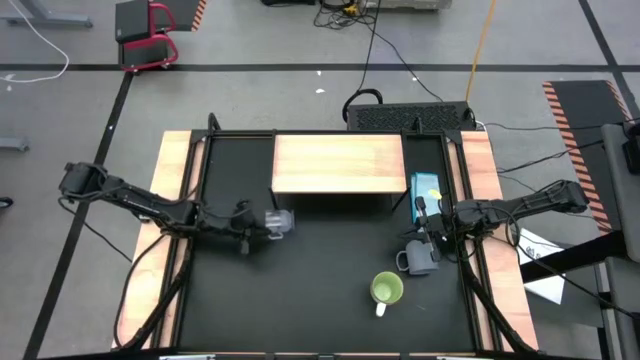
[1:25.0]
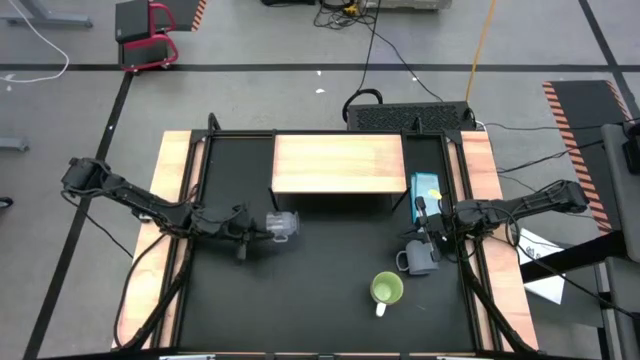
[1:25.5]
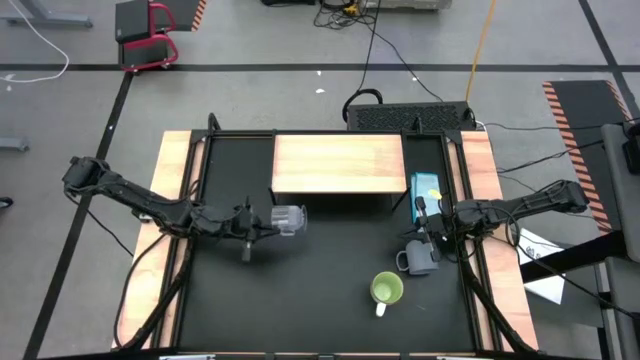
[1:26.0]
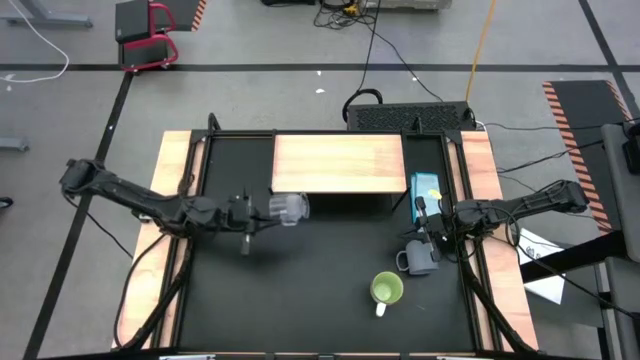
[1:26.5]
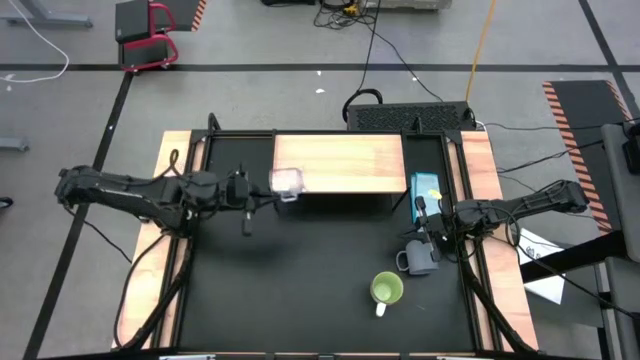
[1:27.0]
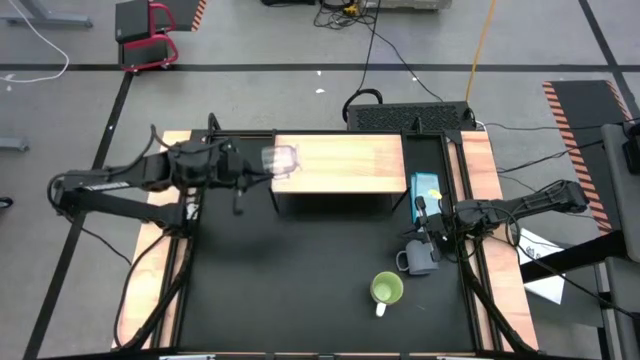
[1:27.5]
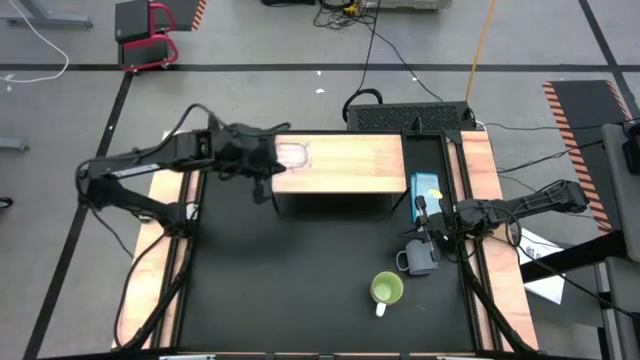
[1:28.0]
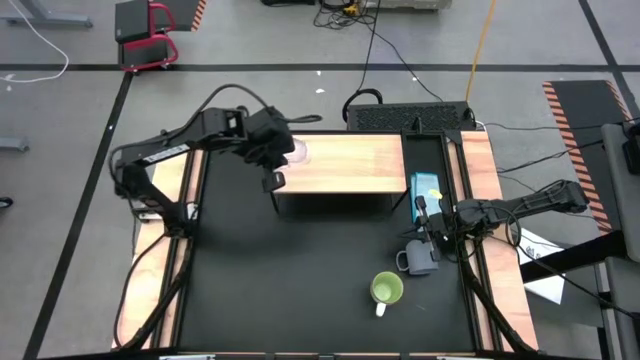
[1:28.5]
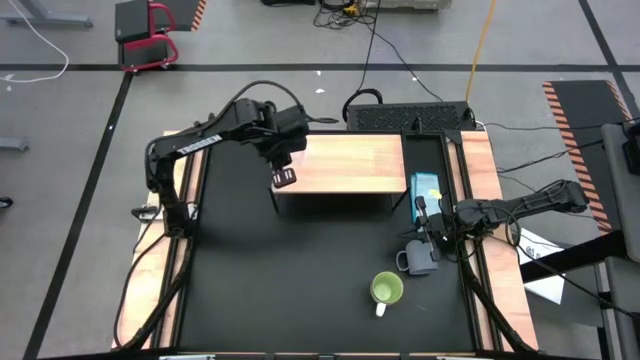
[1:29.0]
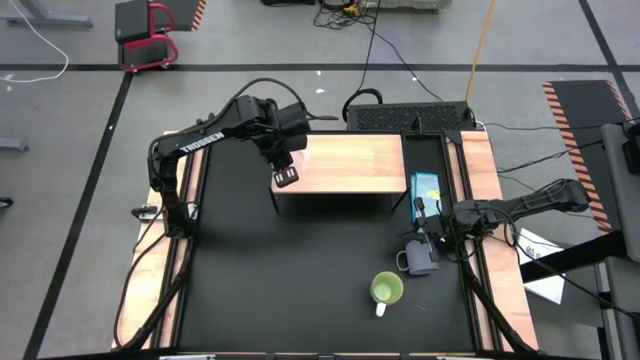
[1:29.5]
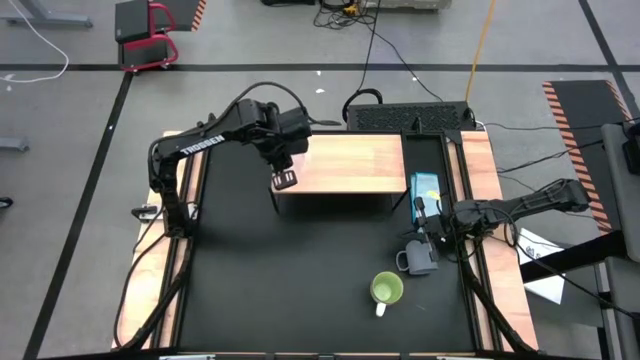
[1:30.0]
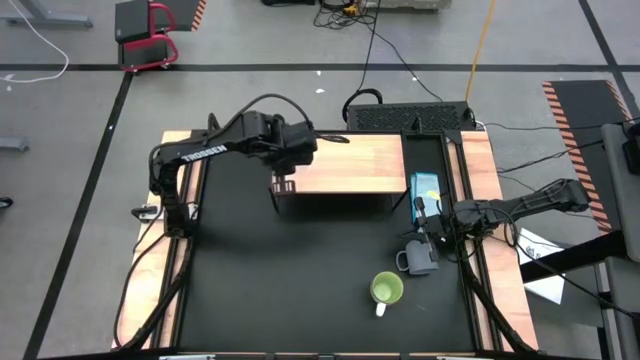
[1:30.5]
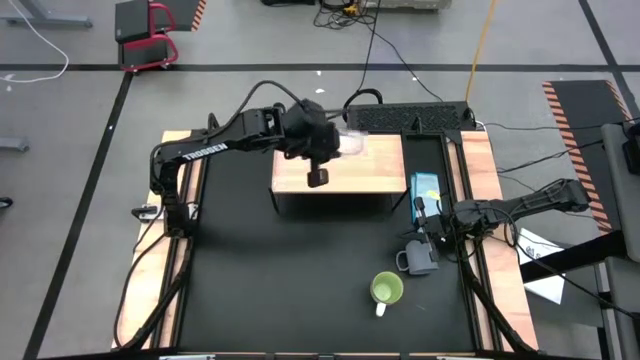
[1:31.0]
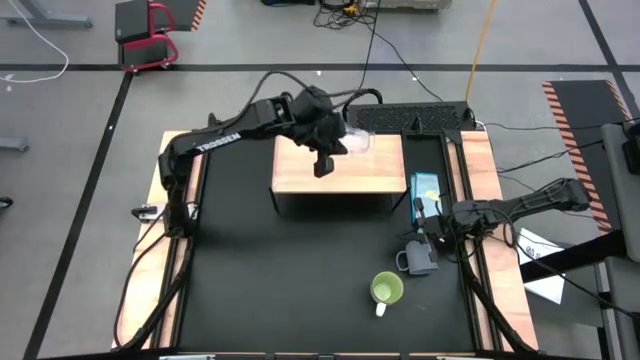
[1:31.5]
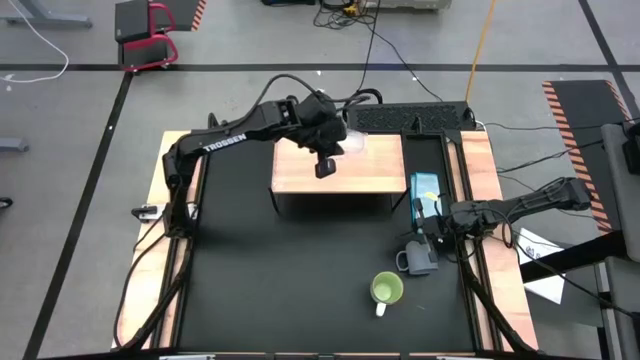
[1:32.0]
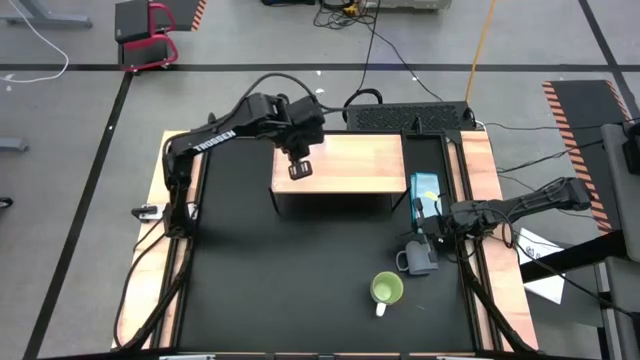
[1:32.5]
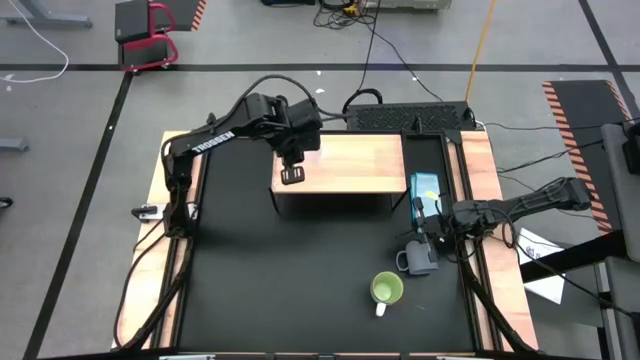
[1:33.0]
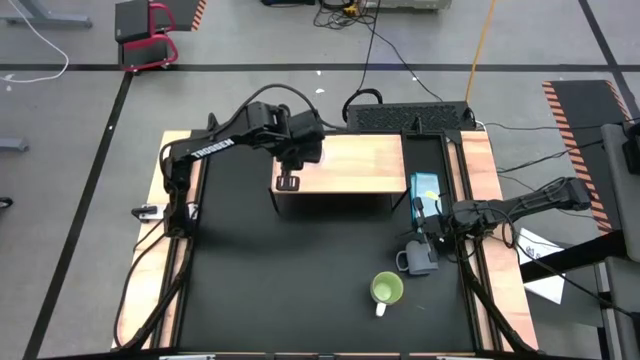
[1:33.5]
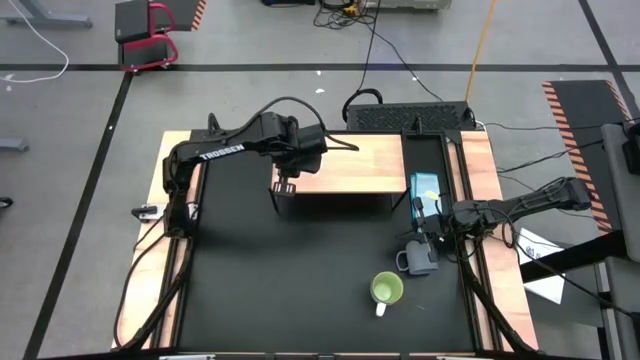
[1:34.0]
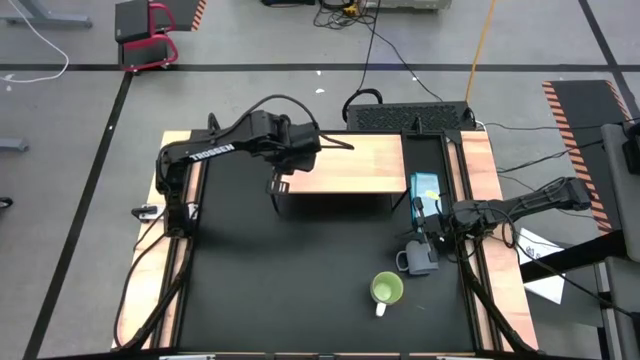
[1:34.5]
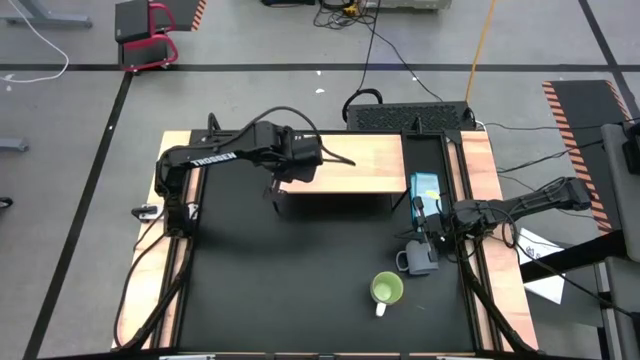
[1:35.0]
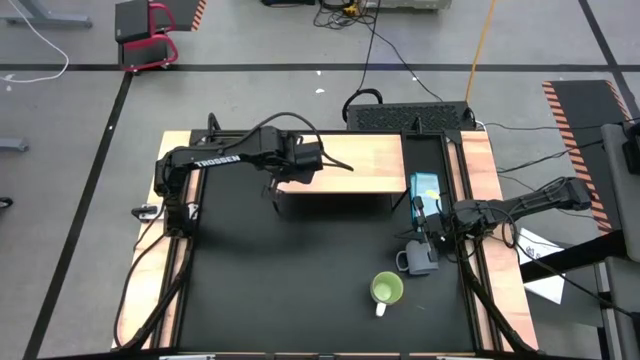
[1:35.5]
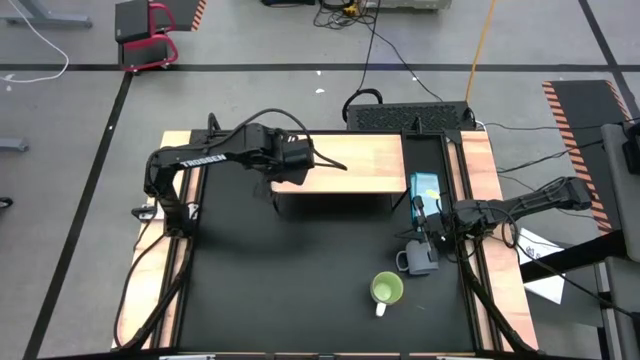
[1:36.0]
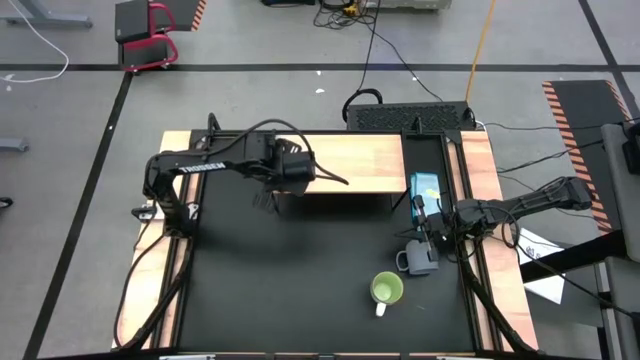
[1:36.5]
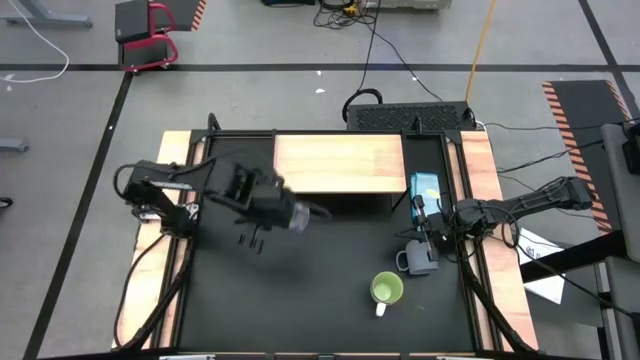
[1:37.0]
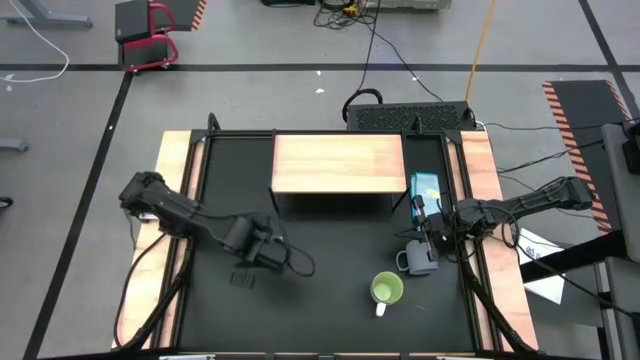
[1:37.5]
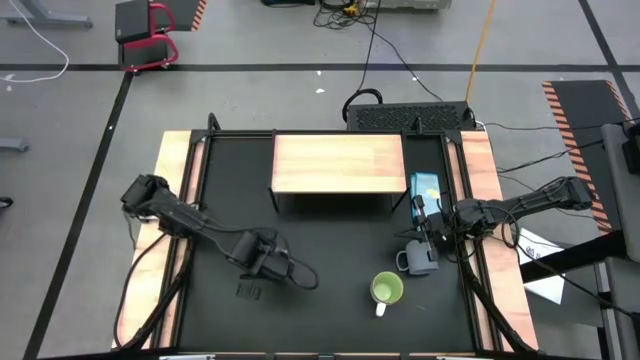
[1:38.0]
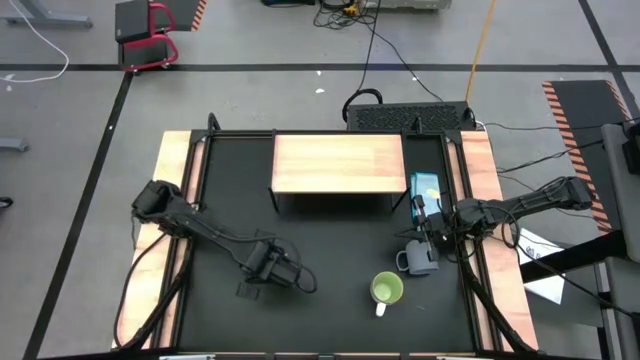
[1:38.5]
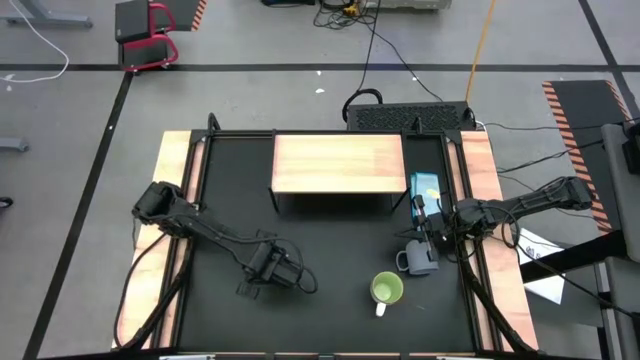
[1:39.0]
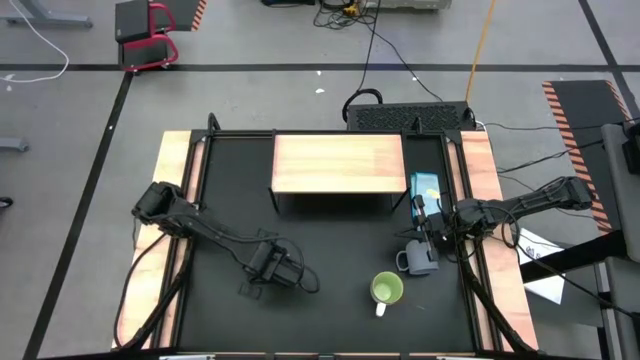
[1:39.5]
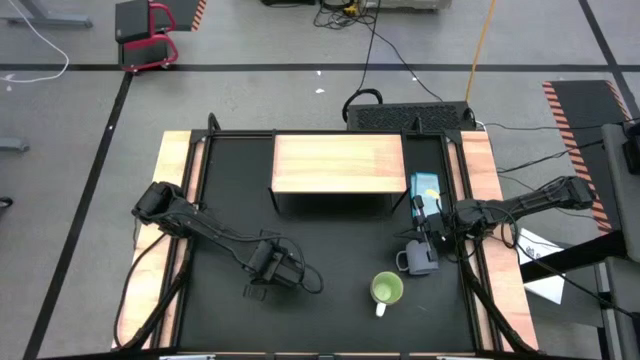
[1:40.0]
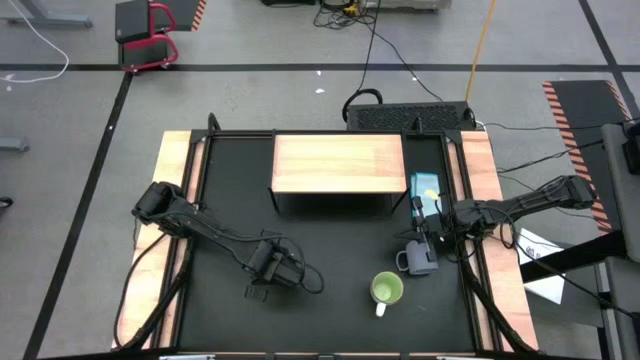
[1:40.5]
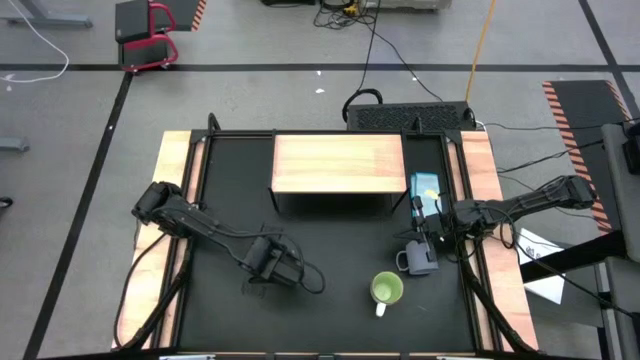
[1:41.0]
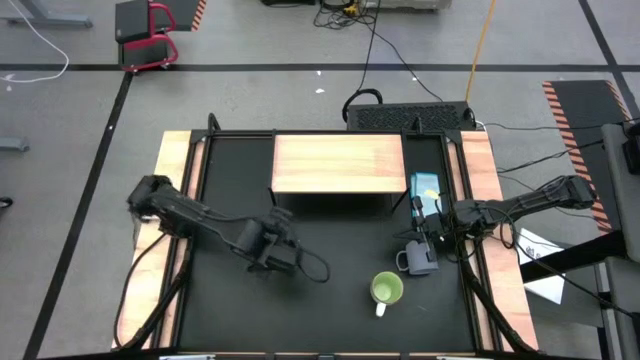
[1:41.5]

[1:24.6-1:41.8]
Task: Stack small to large cups/mugs on shelf
Put the transparent mug on the shelf

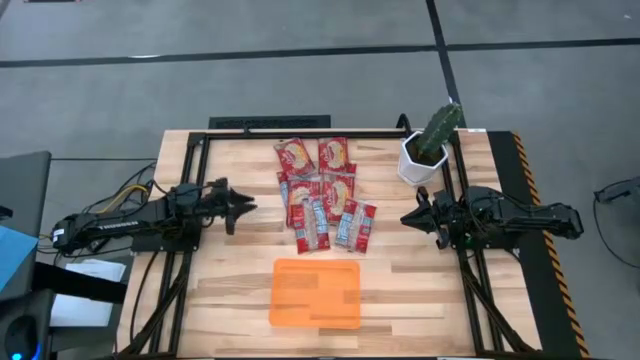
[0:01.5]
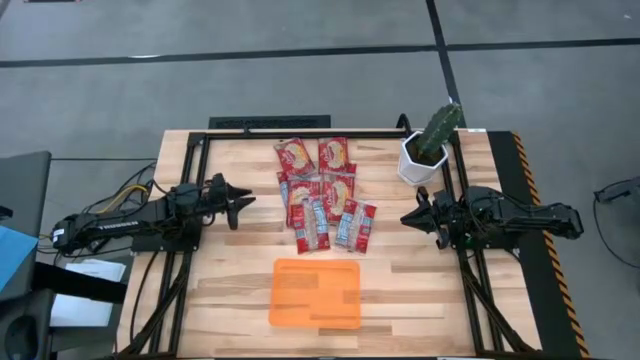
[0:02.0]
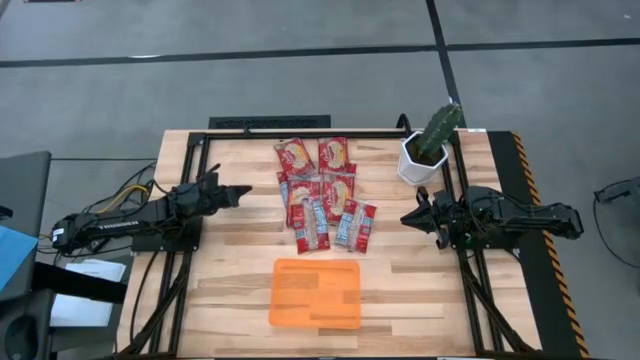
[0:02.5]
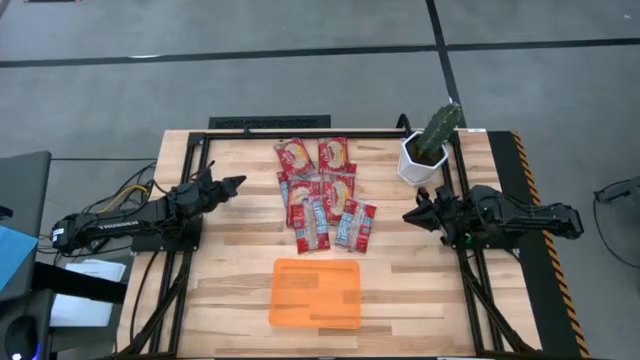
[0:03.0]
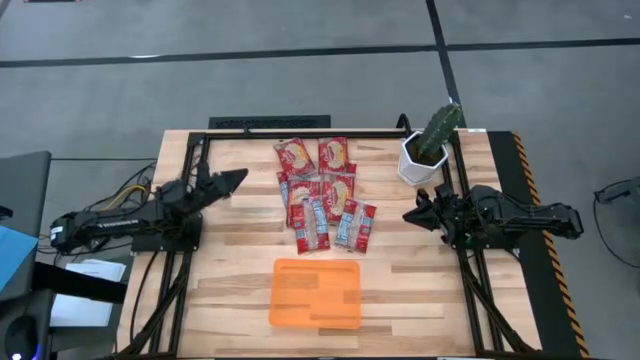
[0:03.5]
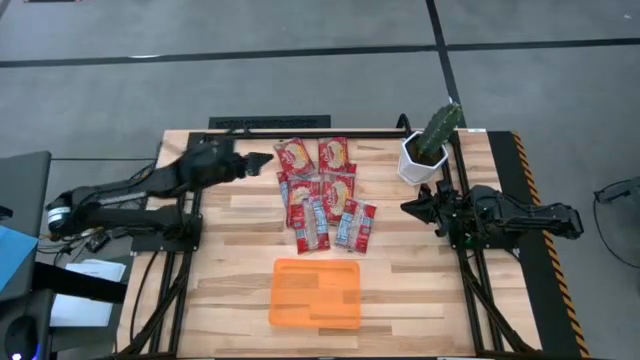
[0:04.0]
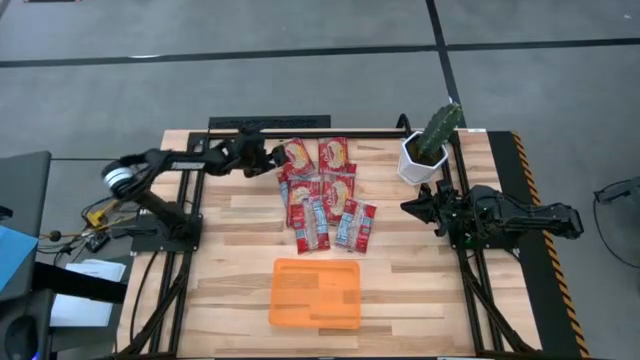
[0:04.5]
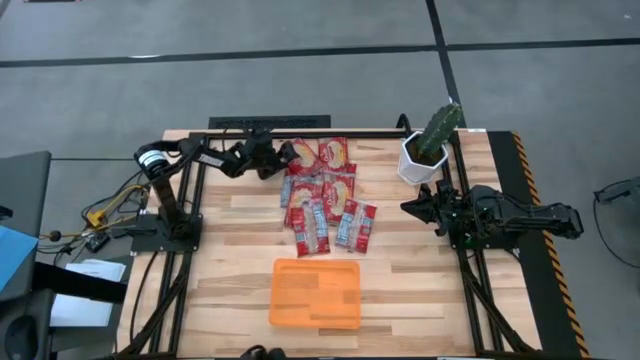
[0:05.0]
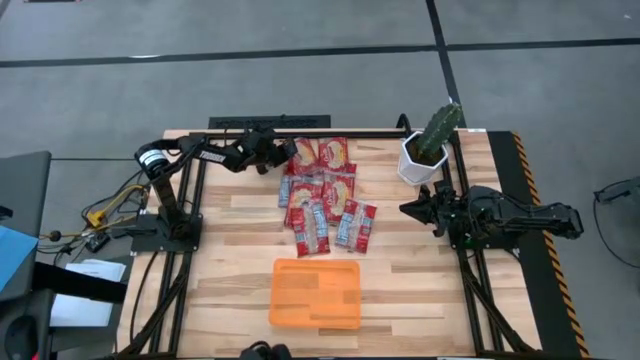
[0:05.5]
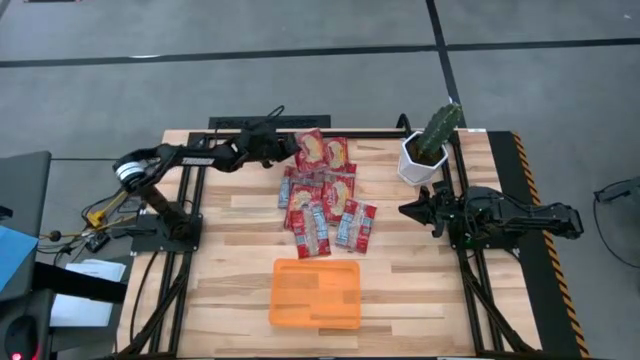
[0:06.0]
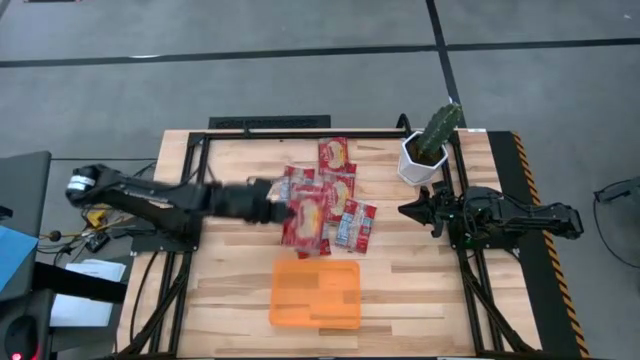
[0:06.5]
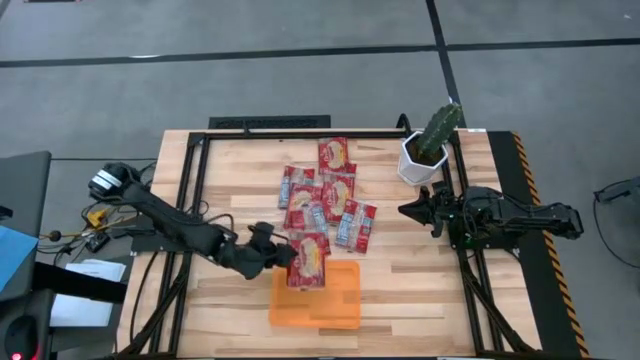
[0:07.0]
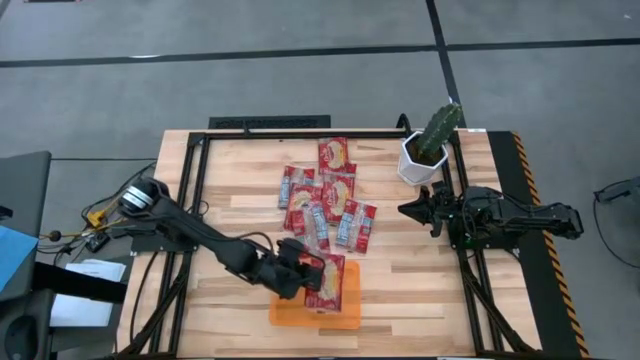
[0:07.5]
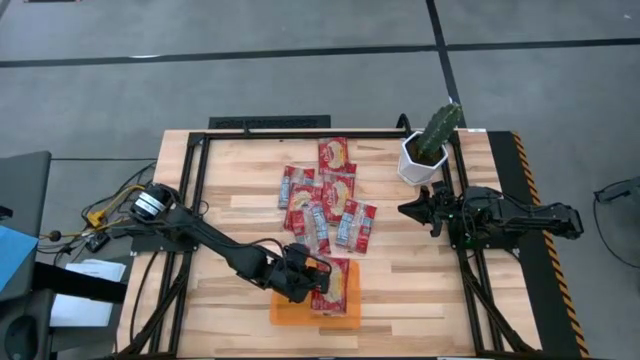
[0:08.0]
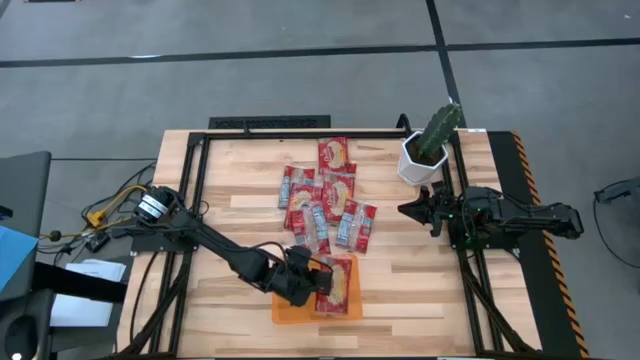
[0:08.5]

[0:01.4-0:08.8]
Task: Sort popcorn bags into baskets
Put the red popcorn bag into the orange bin
